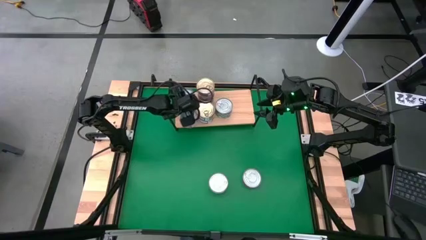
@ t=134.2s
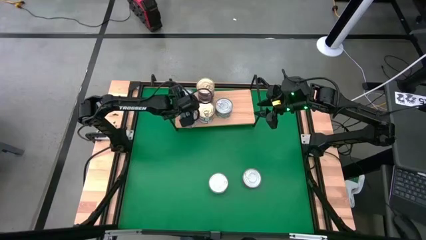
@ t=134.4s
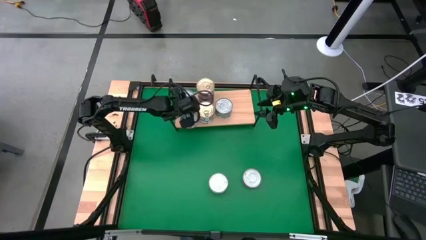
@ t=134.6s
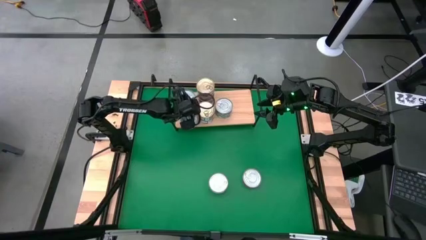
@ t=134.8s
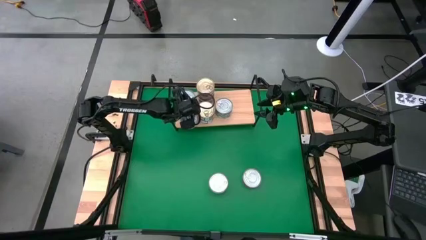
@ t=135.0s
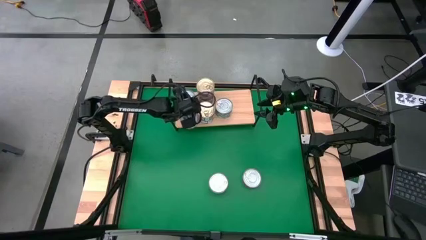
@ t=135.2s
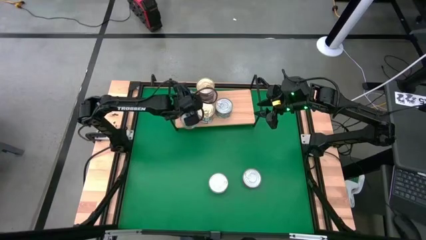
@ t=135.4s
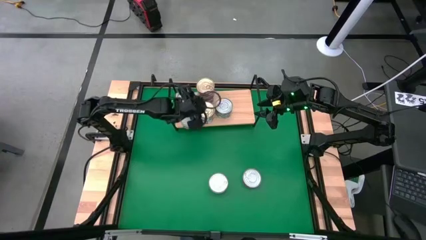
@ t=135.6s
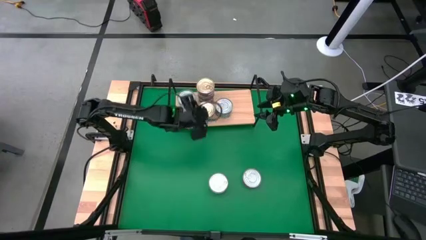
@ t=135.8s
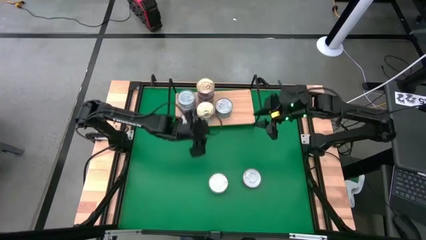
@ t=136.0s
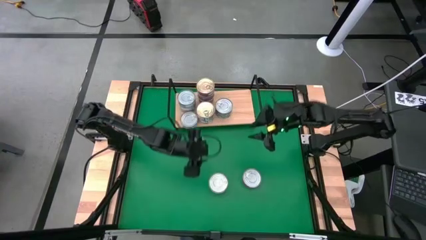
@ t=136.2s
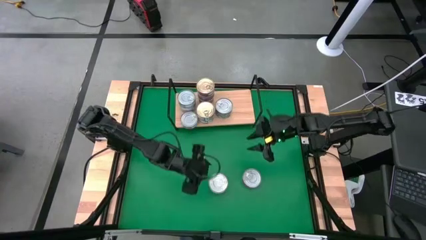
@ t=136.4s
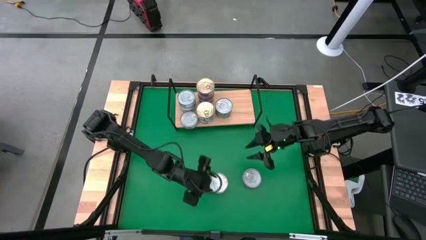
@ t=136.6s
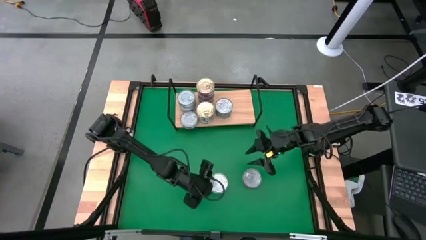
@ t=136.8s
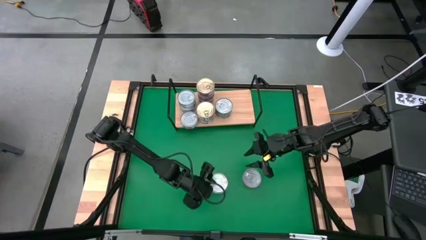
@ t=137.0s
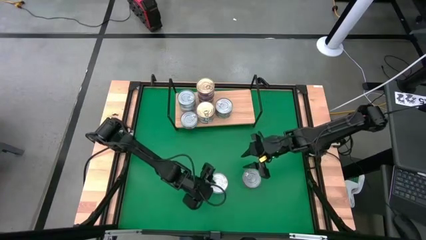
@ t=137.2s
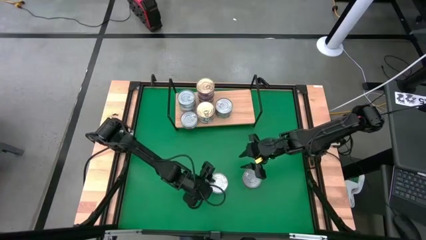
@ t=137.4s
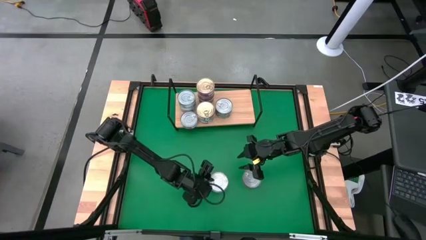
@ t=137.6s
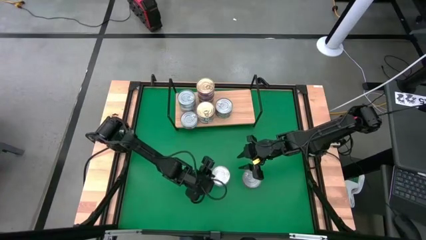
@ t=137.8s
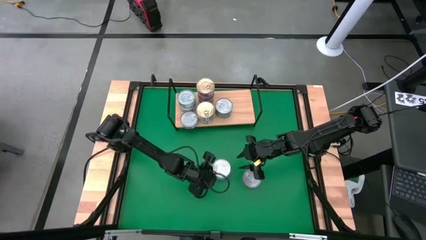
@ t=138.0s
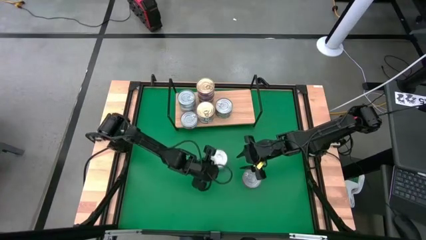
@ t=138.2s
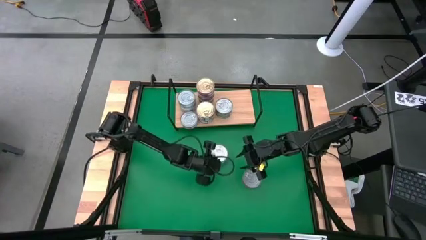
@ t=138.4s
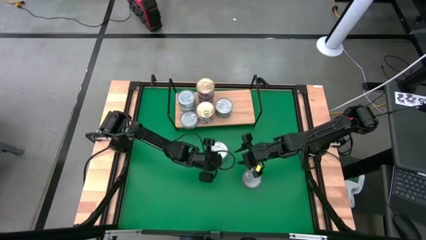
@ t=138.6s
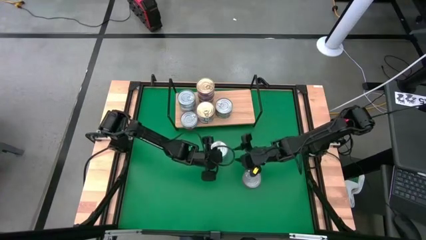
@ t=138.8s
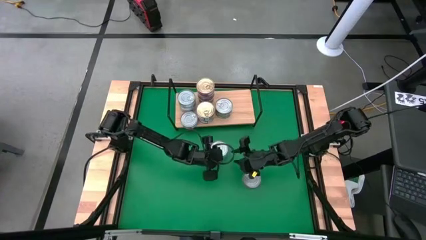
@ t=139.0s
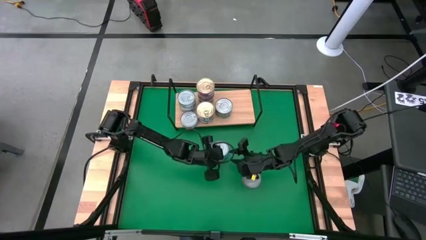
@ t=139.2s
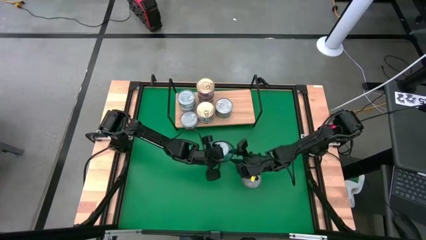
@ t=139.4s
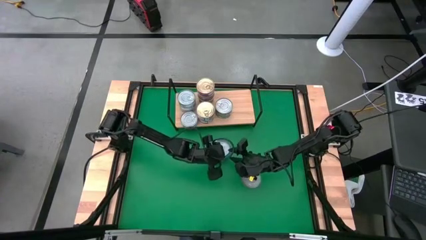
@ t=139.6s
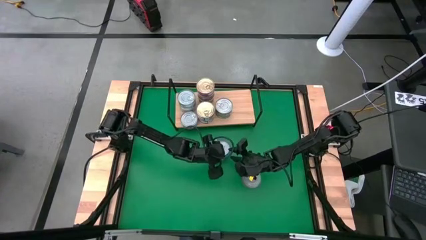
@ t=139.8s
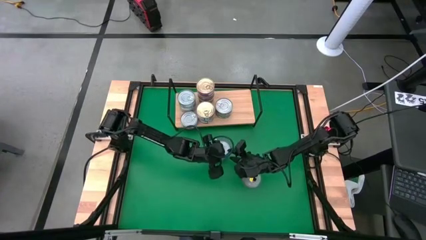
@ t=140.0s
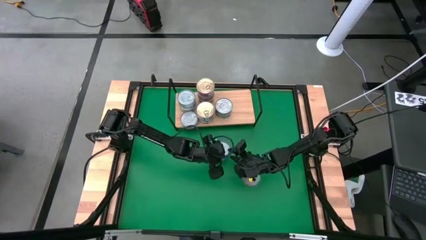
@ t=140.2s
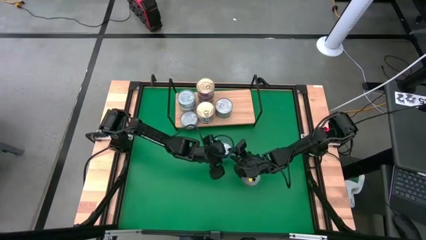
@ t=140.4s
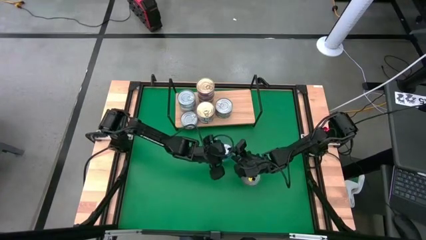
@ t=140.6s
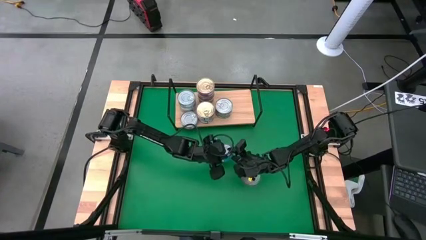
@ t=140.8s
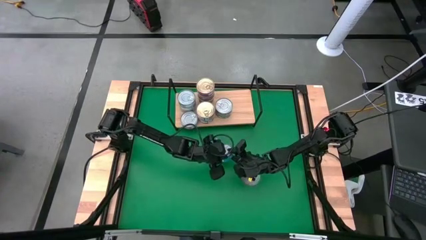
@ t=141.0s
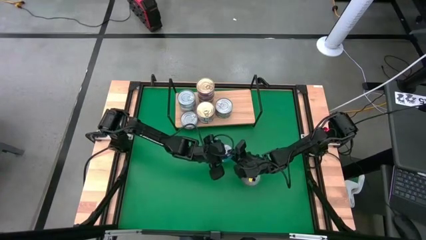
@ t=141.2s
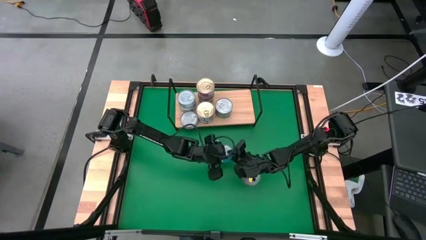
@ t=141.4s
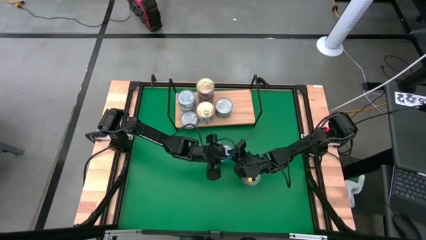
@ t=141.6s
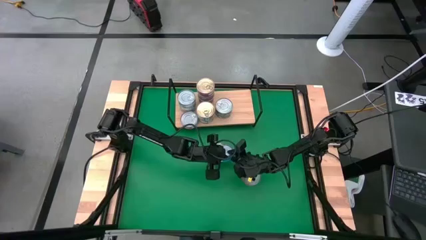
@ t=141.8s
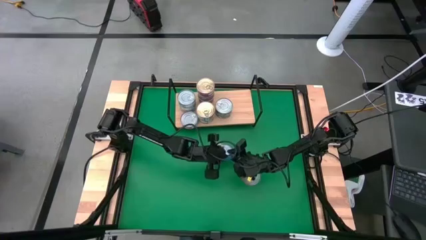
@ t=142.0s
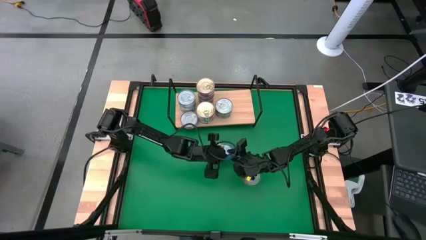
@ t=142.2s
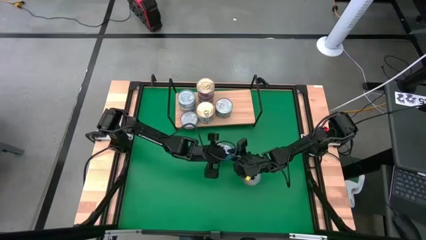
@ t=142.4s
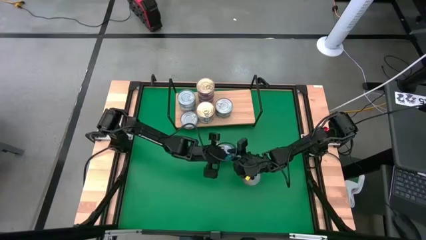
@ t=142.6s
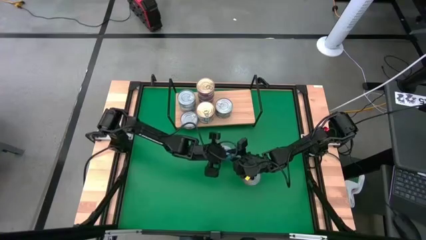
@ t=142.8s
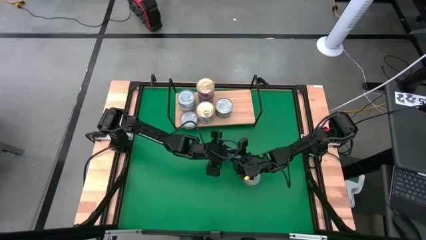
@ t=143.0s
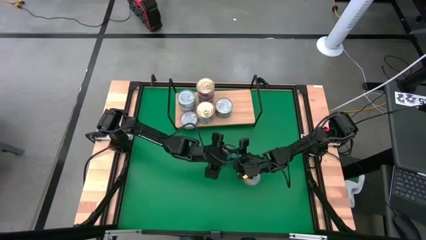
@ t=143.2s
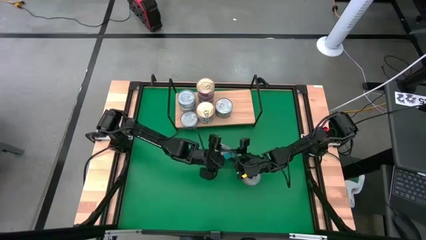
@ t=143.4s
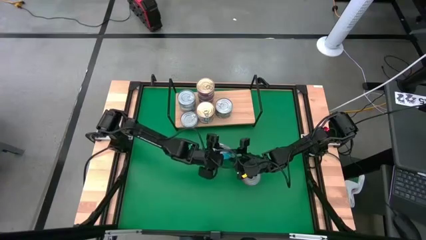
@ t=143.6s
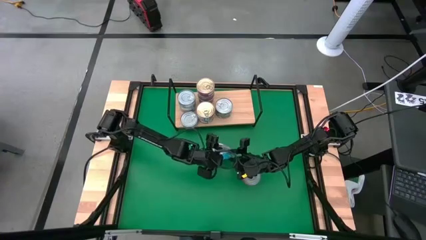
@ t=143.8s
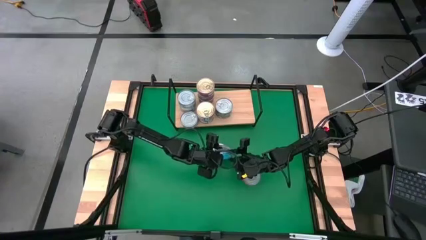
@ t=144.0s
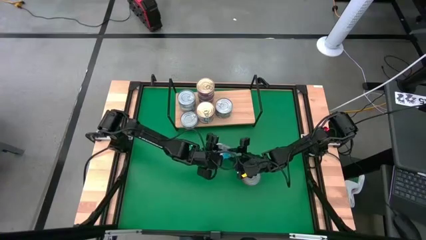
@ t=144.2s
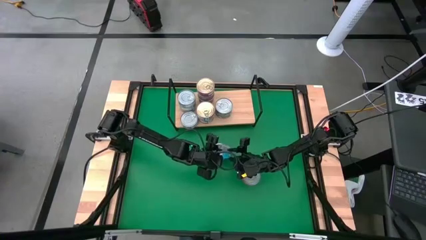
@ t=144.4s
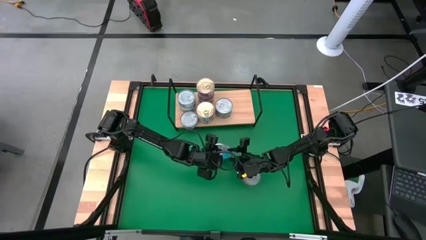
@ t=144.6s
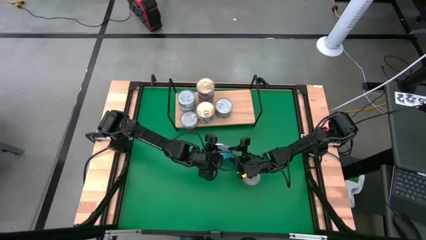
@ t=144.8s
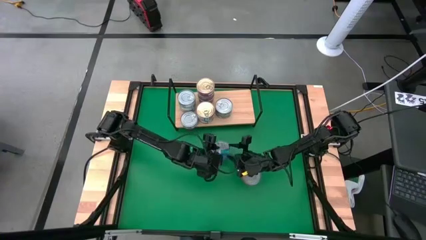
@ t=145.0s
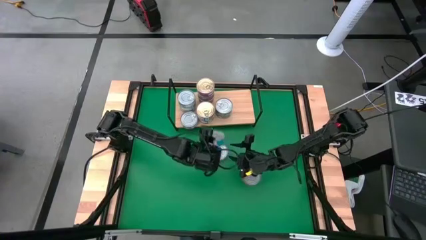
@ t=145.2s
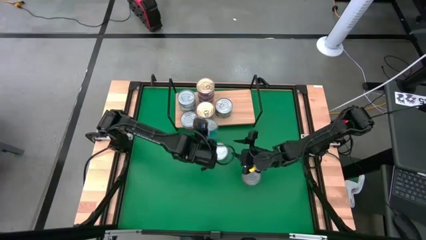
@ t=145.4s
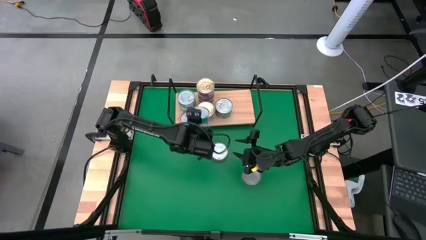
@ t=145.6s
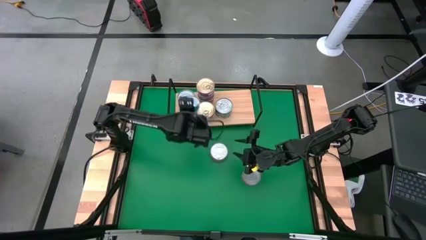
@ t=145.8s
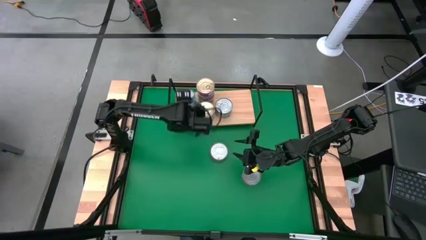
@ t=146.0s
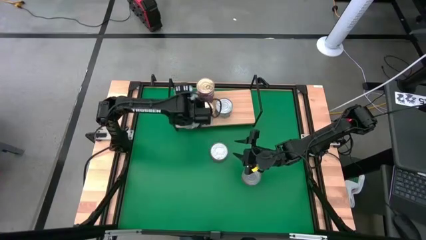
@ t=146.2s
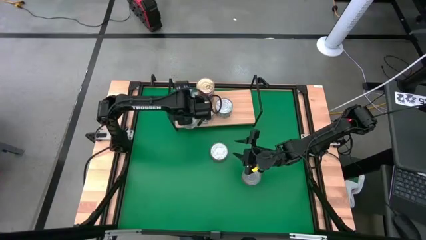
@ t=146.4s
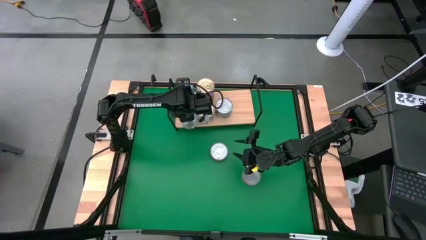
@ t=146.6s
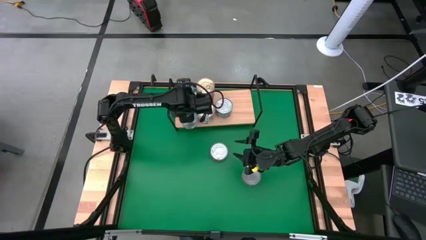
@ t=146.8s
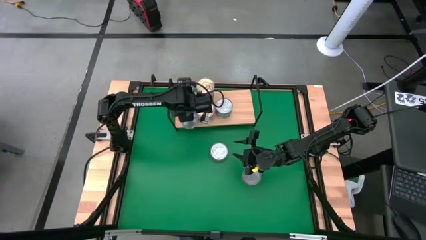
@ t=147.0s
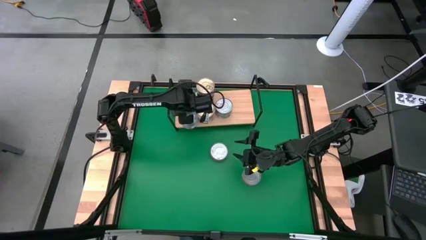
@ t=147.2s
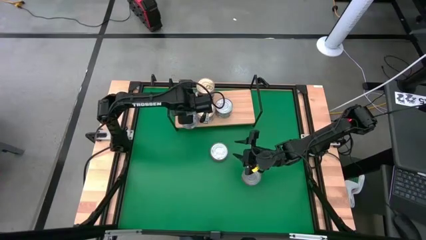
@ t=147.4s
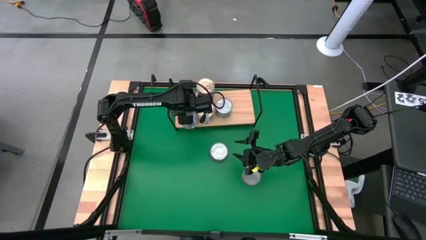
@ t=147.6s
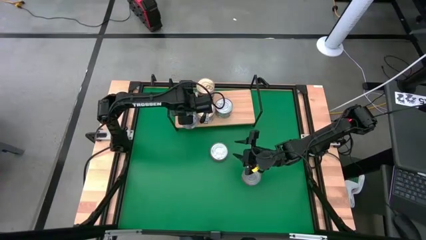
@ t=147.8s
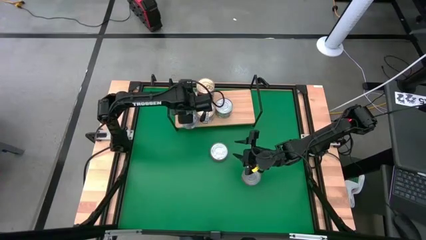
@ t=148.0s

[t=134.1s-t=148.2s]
Task: Stack canned seafood by type on shelf
Stack the yellow-blue tuna can on top of the other yellow-blue tuna can on the shelf
